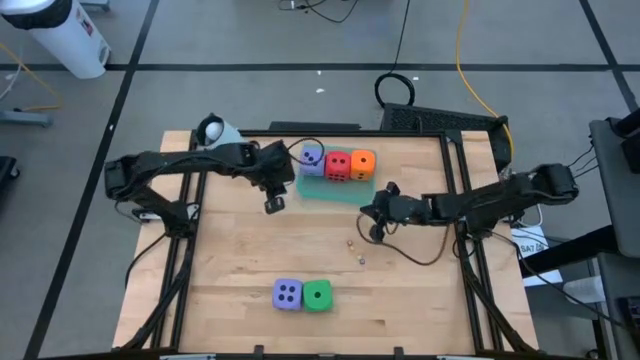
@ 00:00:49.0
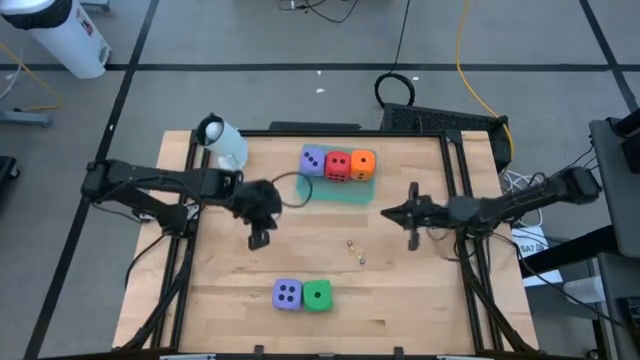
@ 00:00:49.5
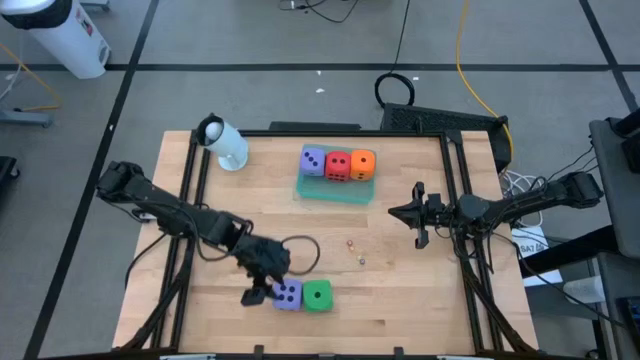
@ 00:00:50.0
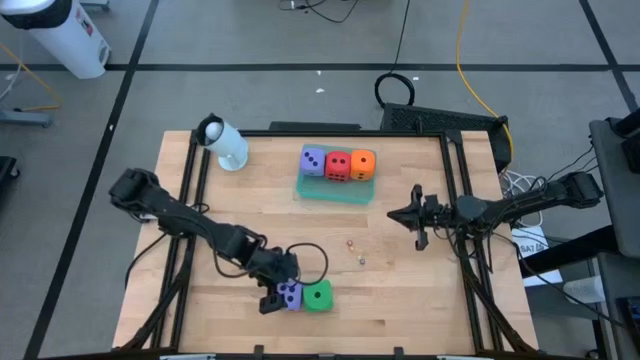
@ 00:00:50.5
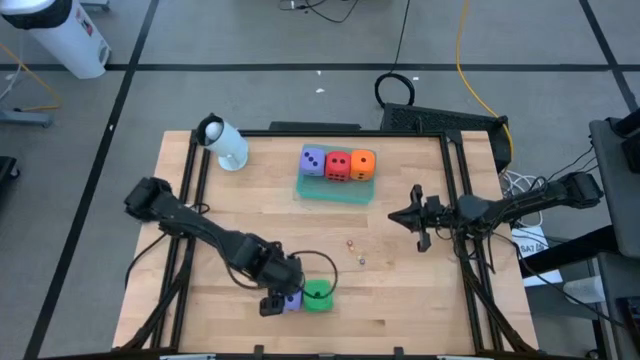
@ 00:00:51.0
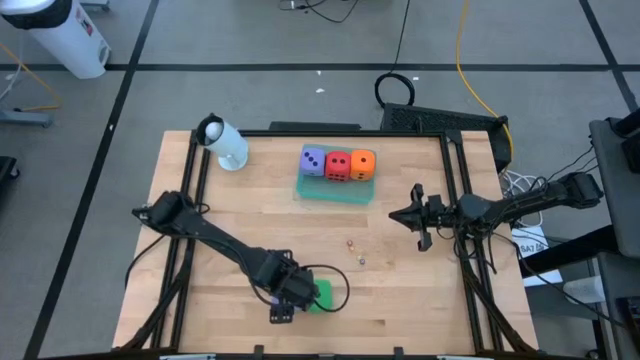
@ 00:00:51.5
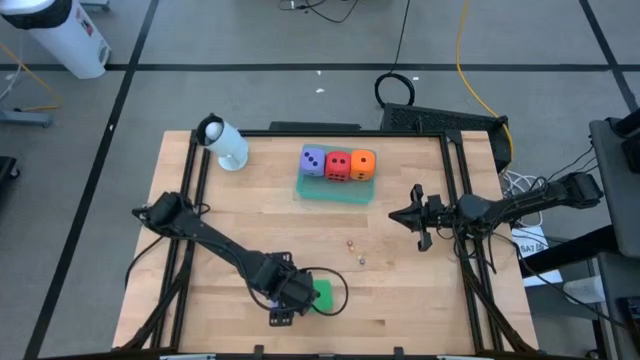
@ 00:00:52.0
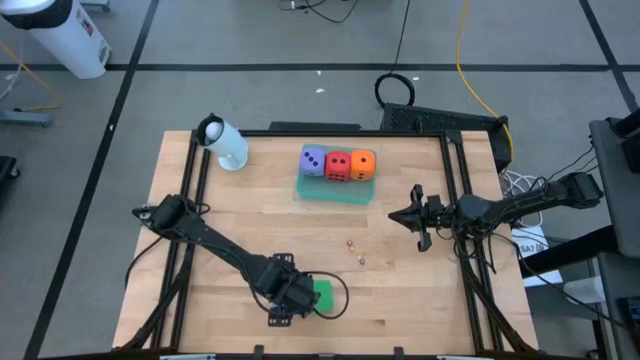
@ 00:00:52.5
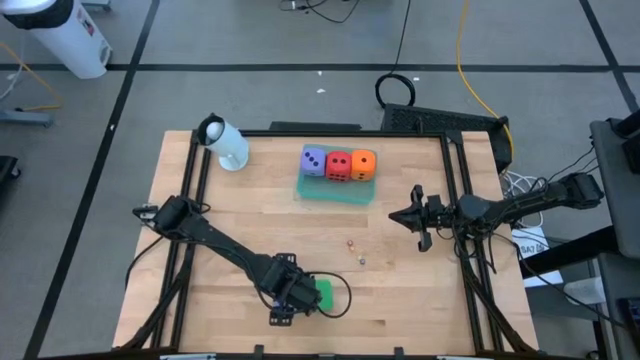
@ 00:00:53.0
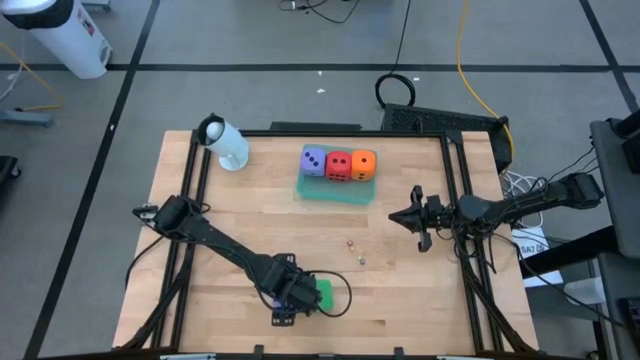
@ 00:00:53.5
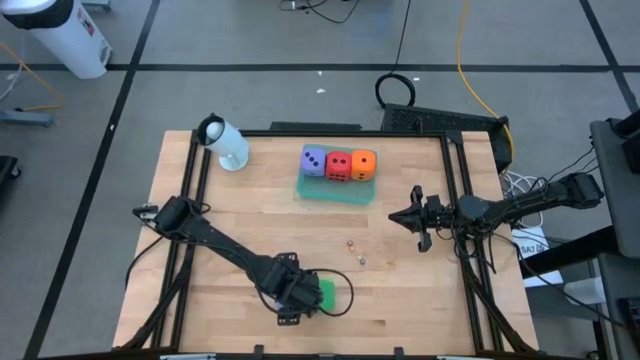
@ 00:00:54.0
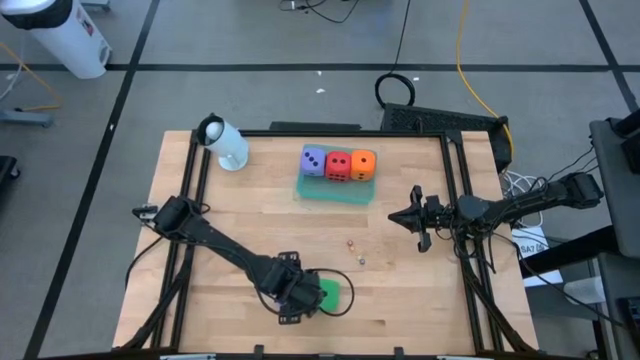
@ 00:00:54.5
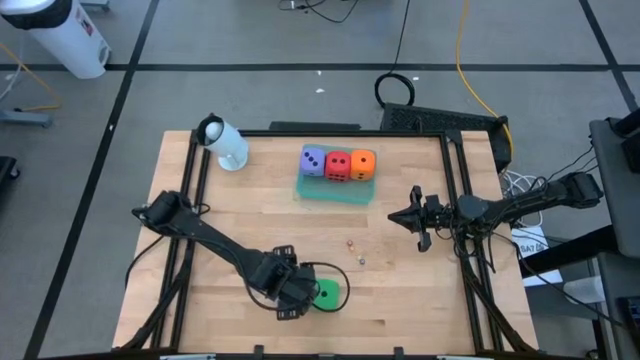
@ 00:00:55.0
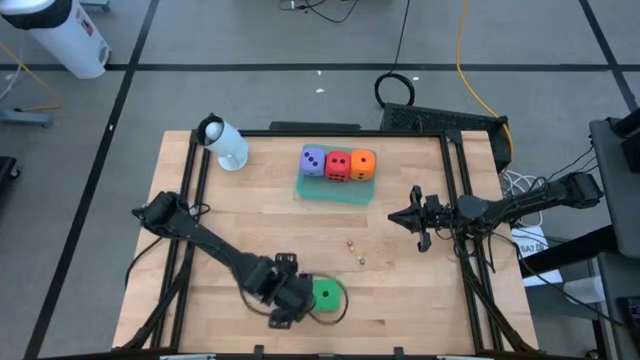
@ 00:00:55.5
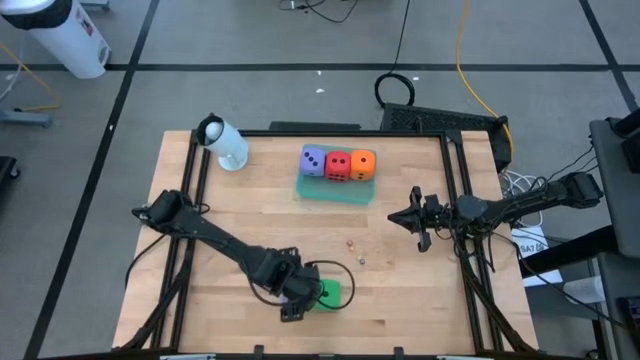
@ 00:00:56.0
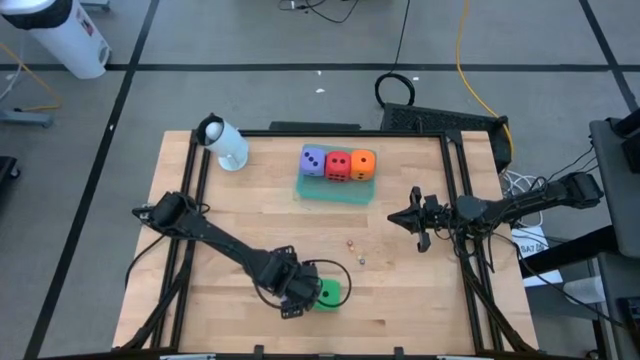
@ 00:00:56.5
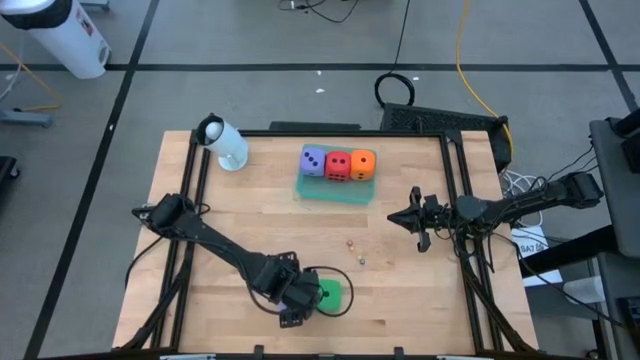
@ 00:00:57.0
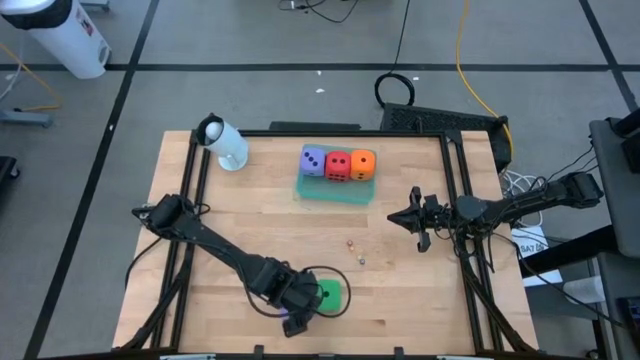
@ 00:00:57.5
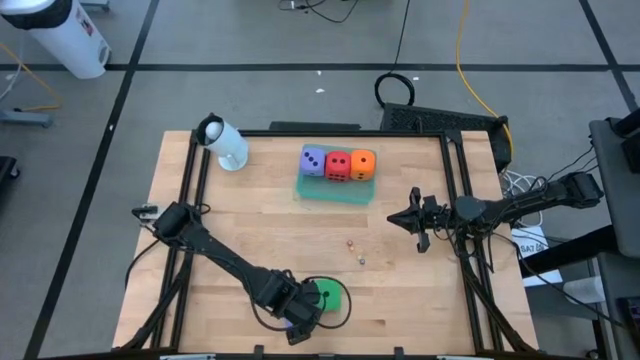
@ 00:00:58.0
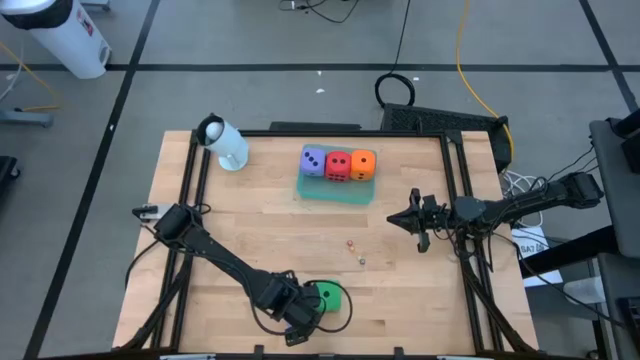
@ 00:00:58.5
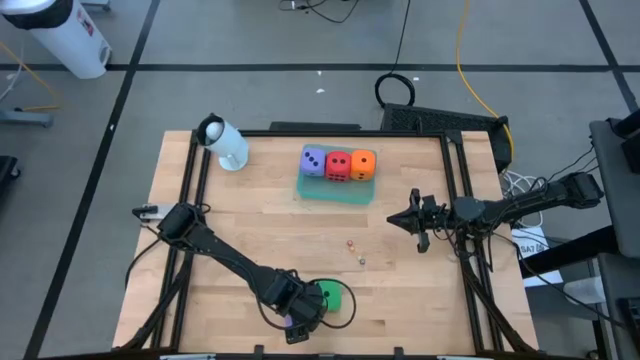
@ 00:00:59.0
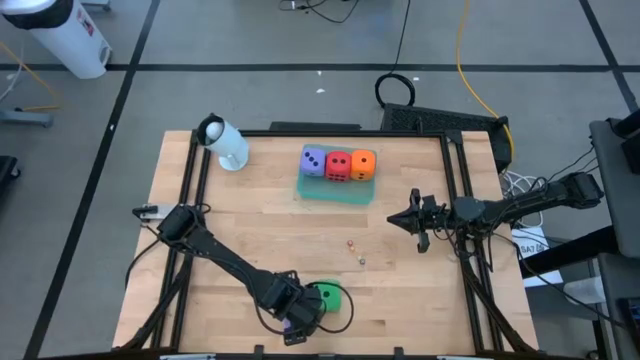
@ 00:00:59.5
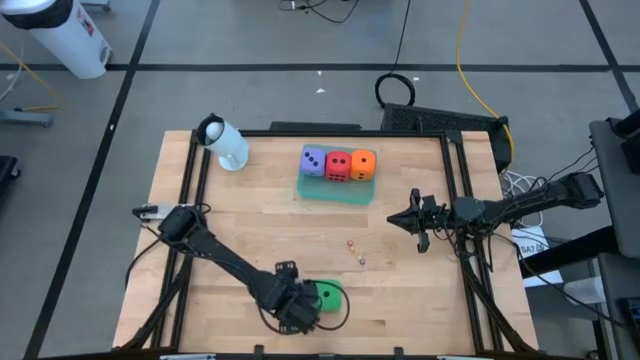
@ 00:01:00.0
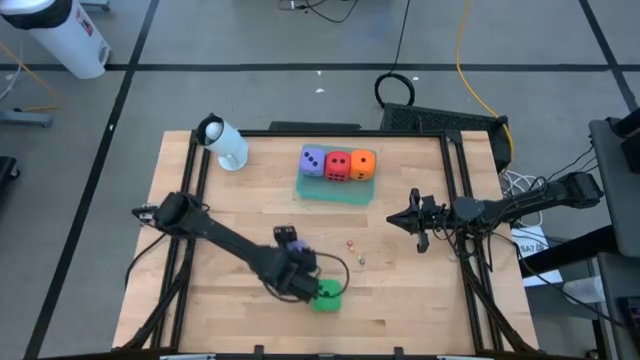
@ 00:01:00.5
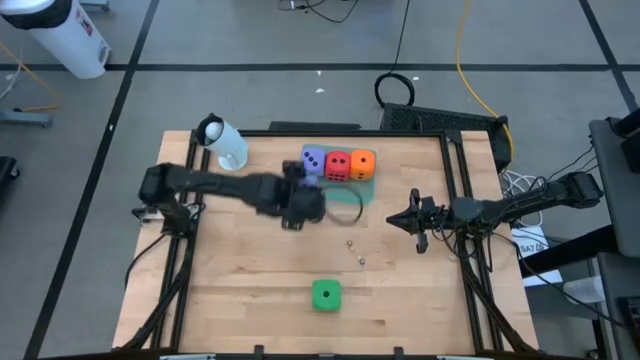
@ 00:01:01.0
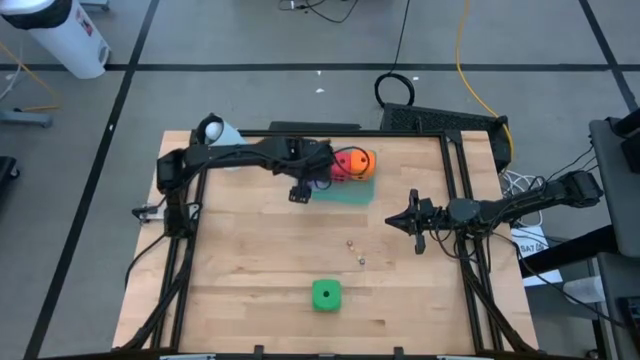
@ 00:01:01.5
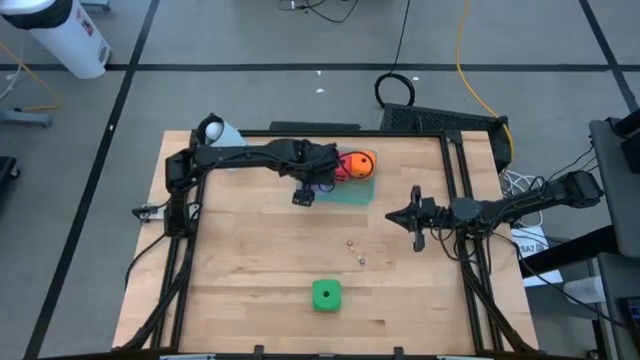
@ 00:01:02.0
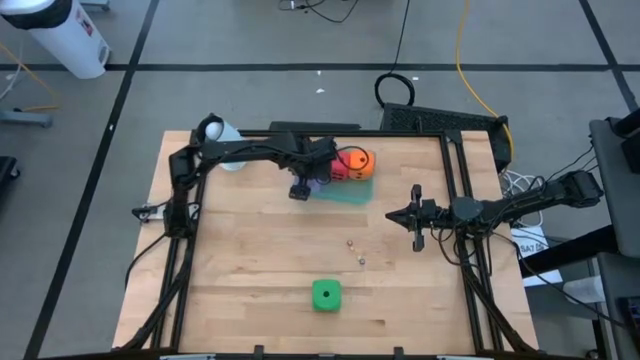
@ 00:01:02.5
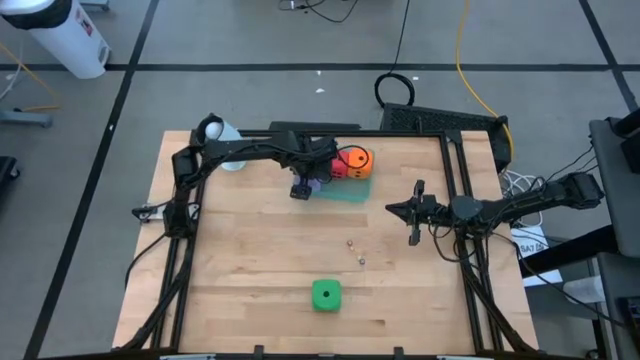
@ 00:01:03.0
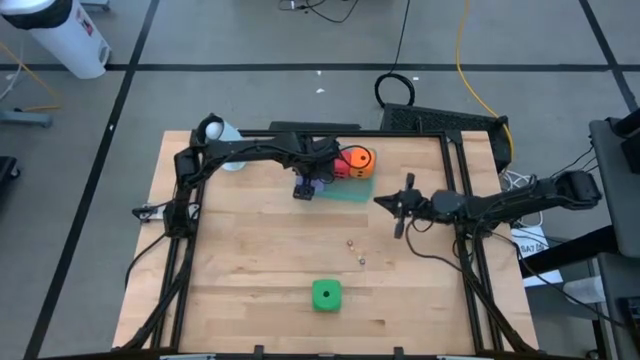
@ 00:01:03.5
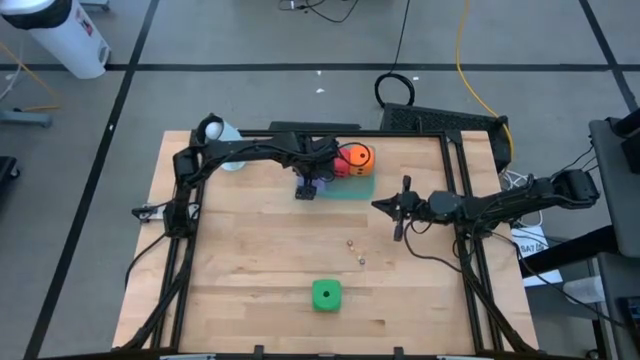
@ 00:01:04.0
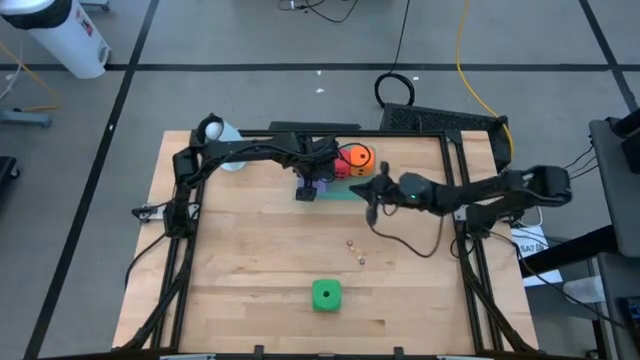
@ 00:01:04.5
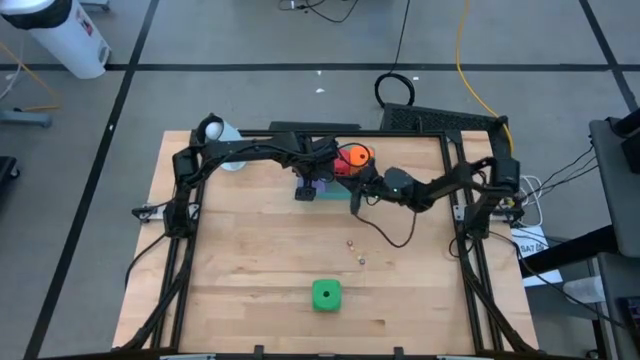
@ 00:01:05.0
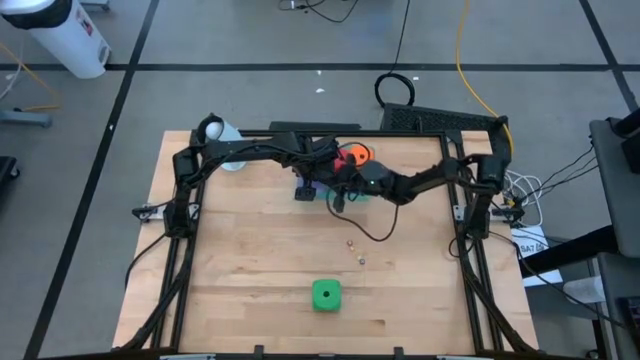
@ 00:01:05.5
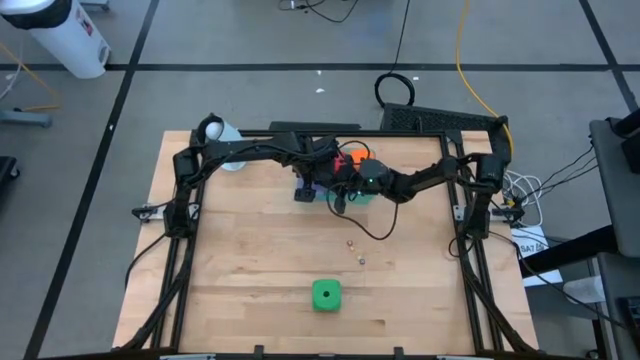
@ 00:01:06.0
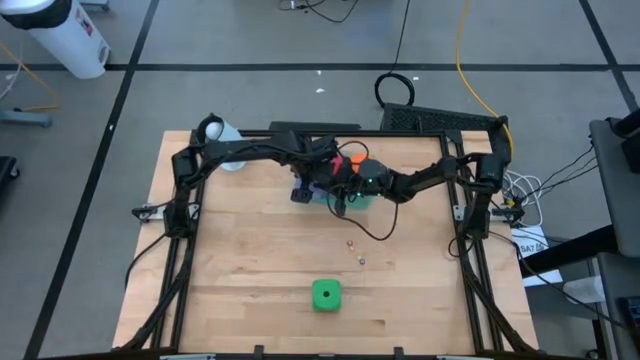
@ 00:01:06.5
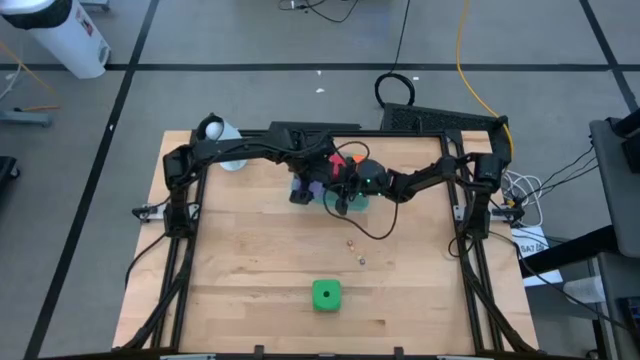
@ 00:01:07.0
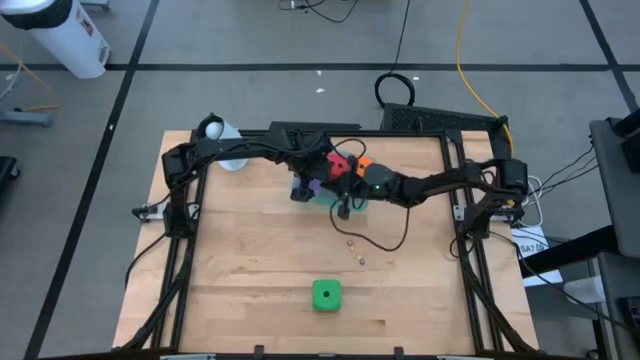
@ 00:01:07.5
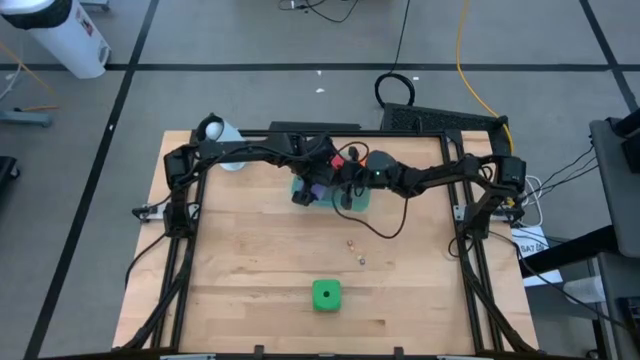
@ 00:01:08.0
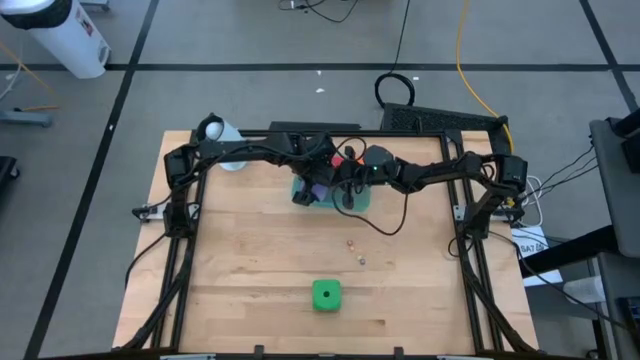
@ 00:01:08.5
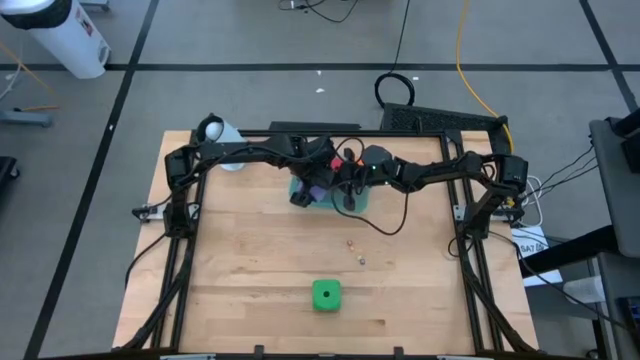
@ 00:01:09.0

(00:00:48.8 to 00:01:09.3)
Task: Pick & Place Dice
Put the large purple die into the green bin
